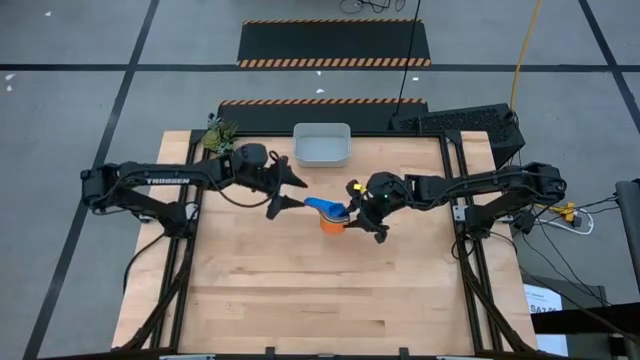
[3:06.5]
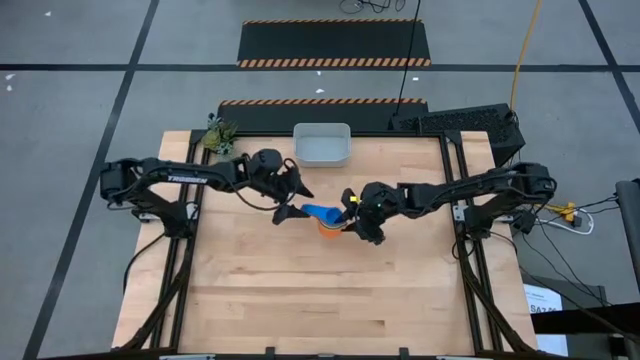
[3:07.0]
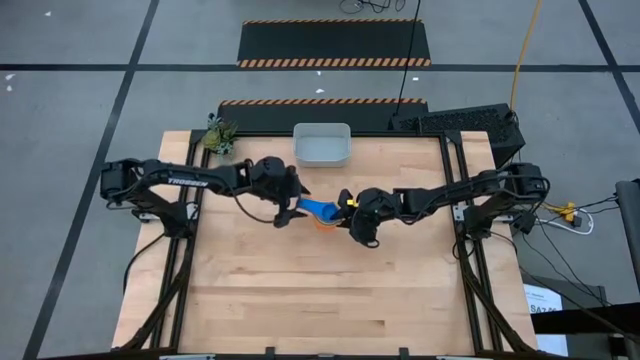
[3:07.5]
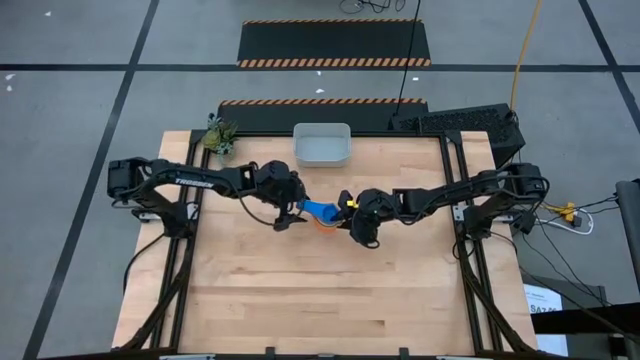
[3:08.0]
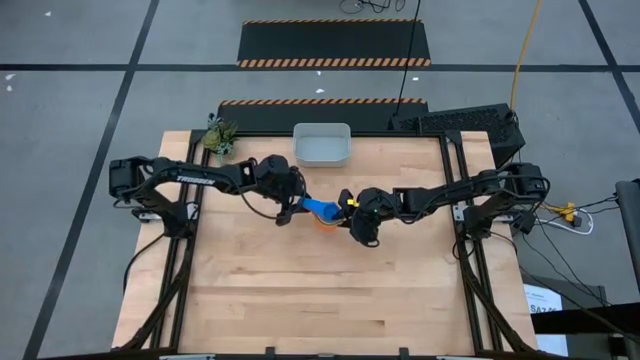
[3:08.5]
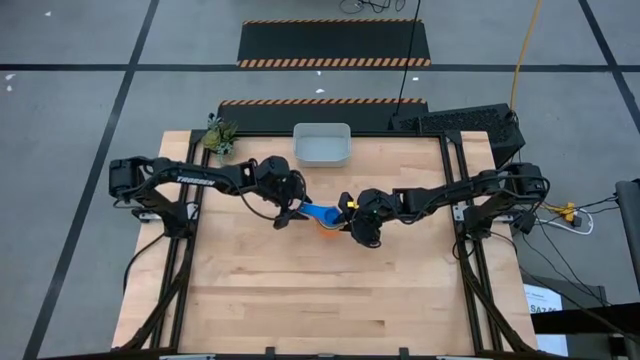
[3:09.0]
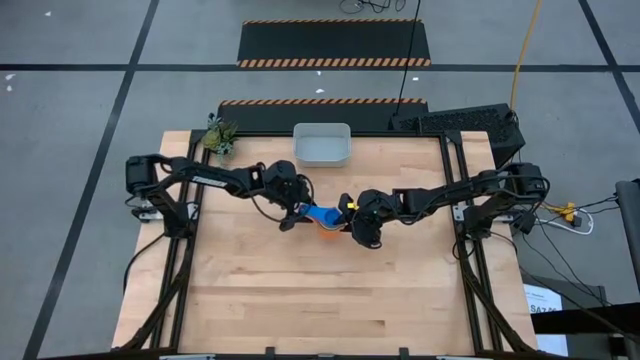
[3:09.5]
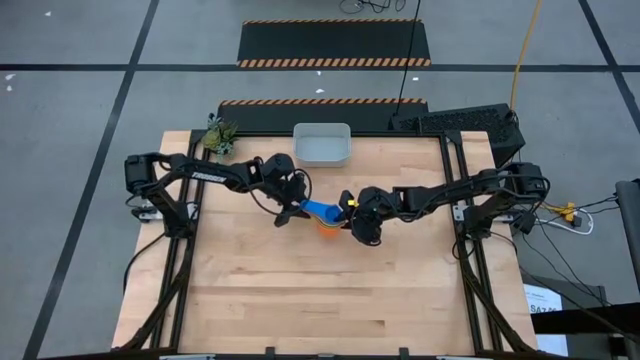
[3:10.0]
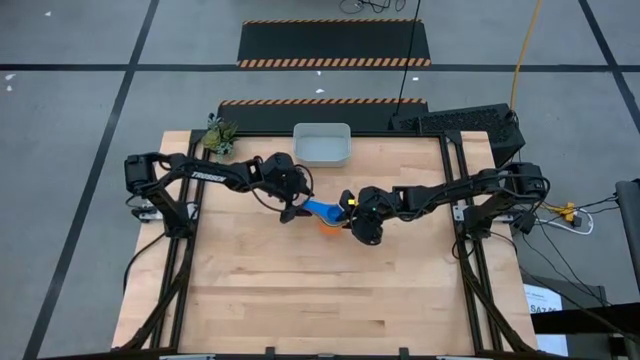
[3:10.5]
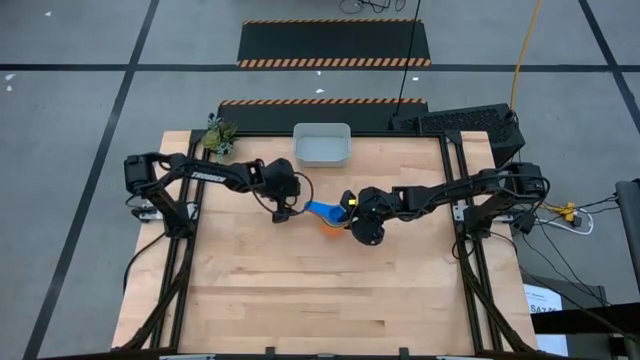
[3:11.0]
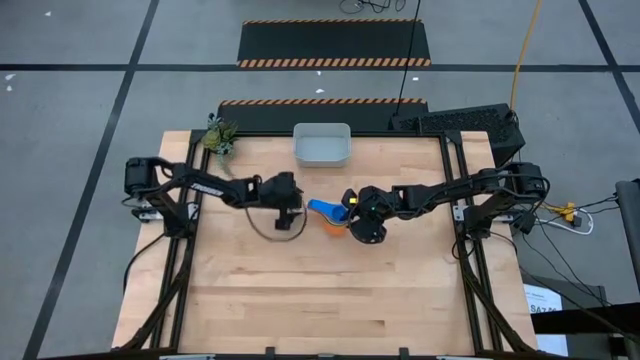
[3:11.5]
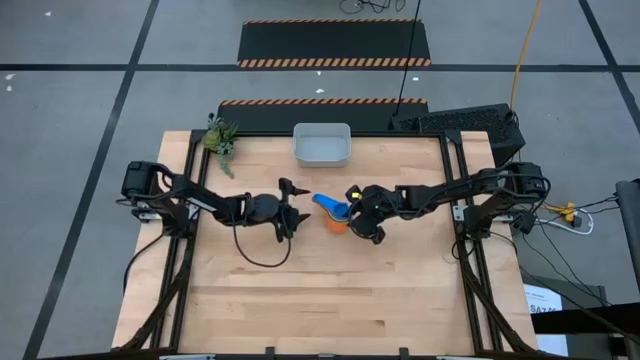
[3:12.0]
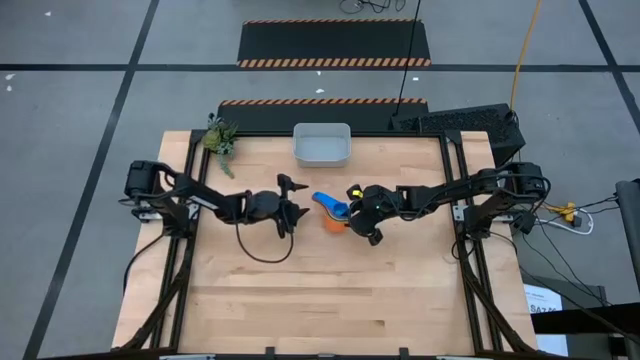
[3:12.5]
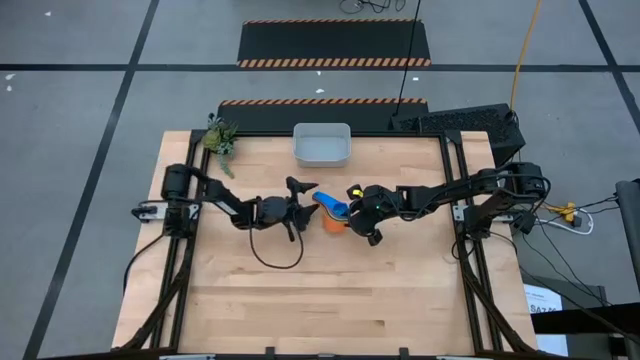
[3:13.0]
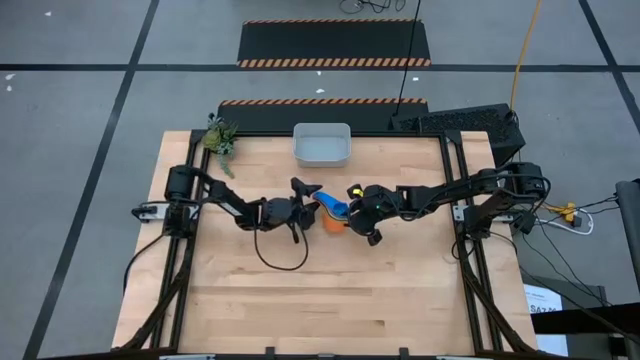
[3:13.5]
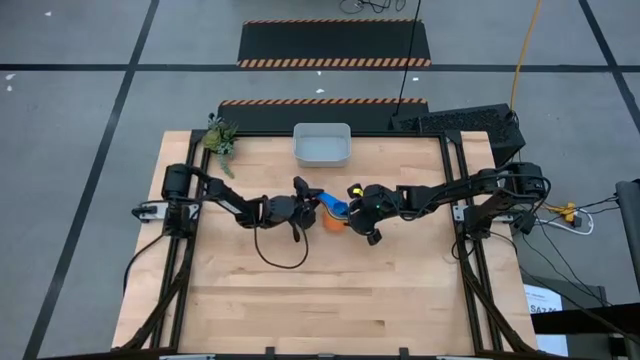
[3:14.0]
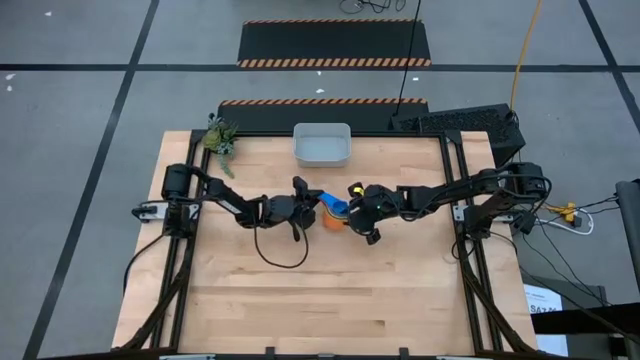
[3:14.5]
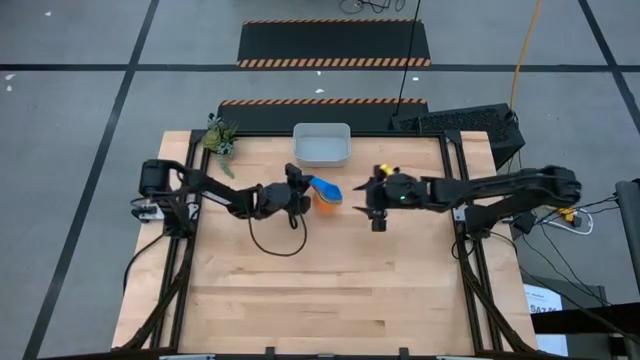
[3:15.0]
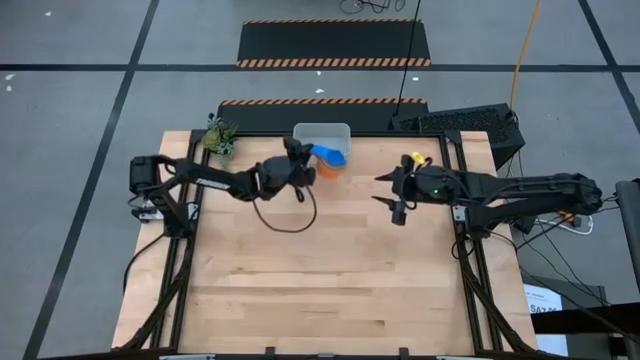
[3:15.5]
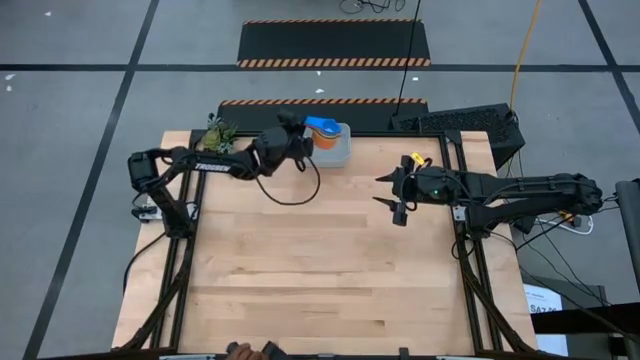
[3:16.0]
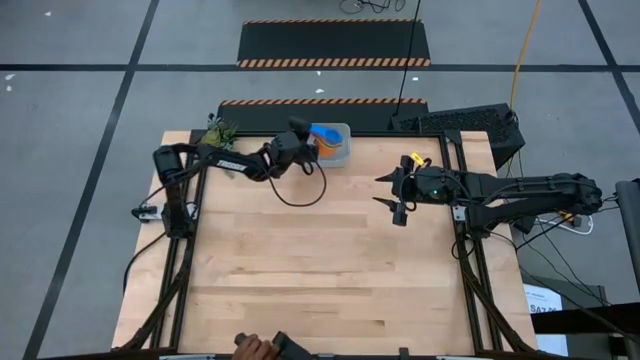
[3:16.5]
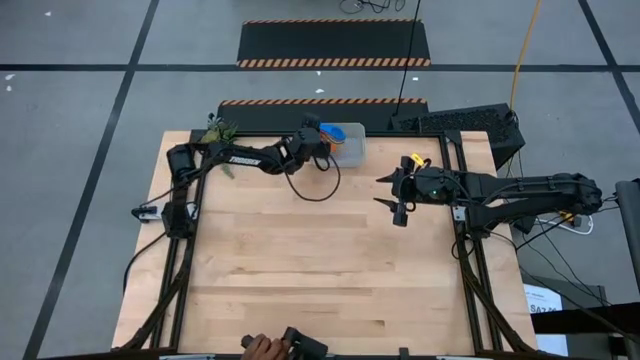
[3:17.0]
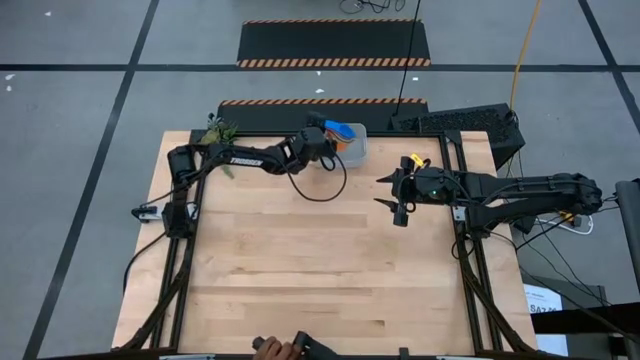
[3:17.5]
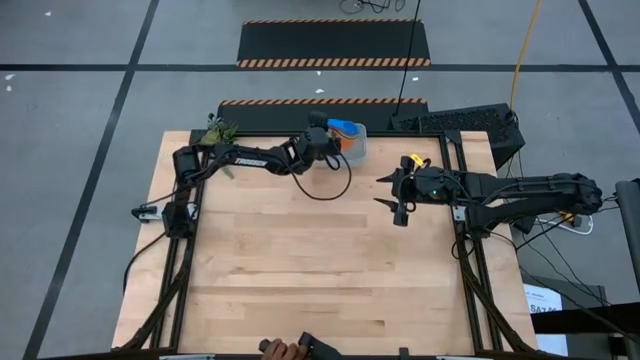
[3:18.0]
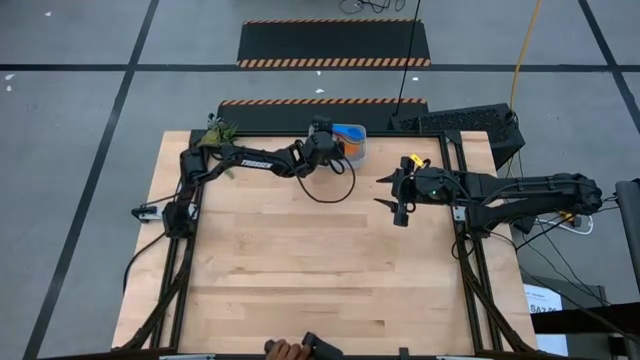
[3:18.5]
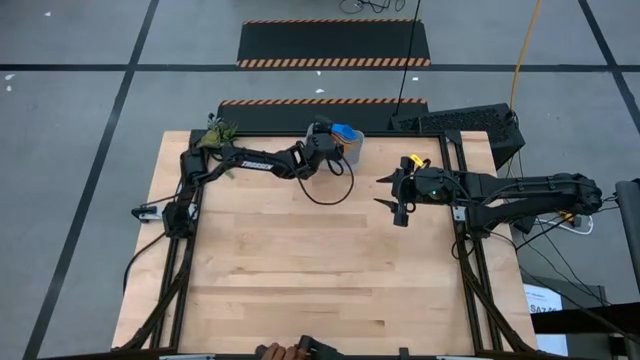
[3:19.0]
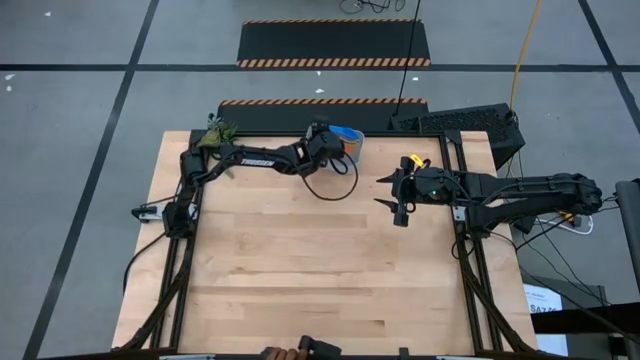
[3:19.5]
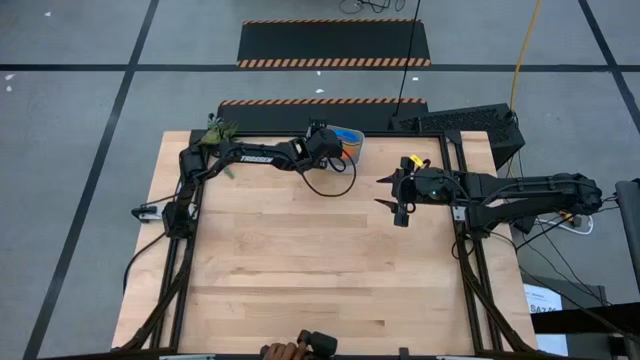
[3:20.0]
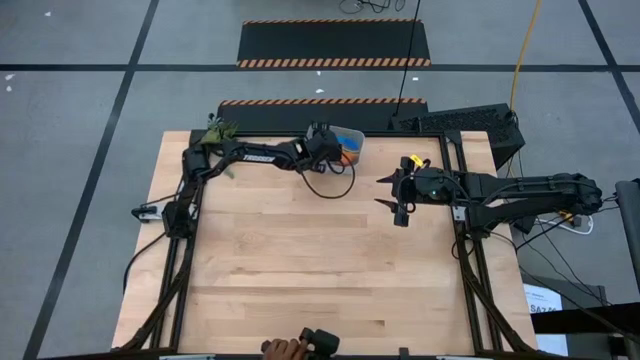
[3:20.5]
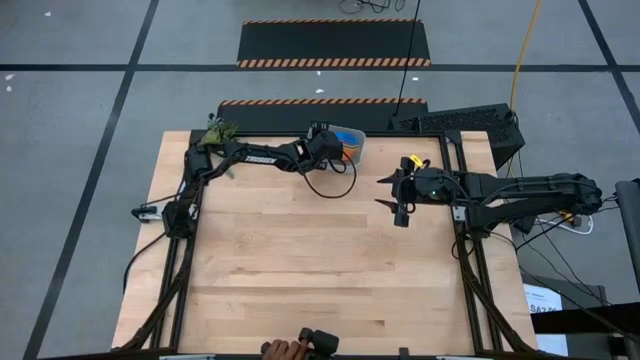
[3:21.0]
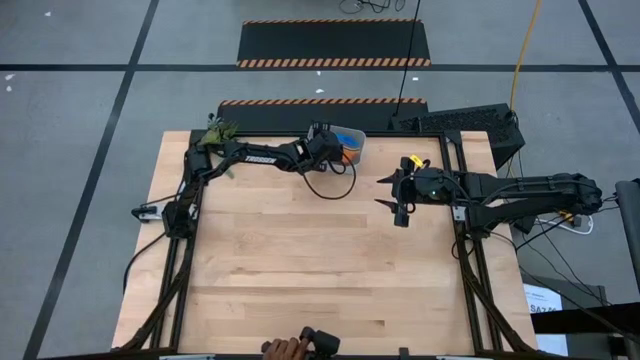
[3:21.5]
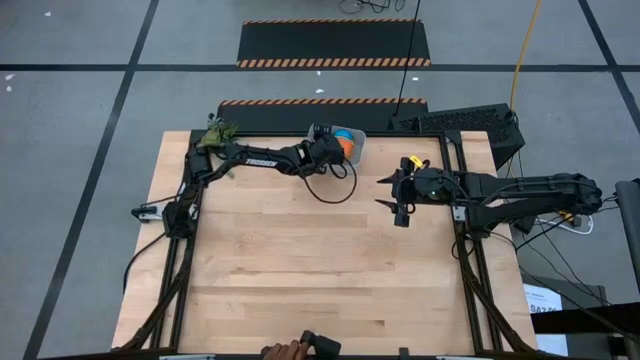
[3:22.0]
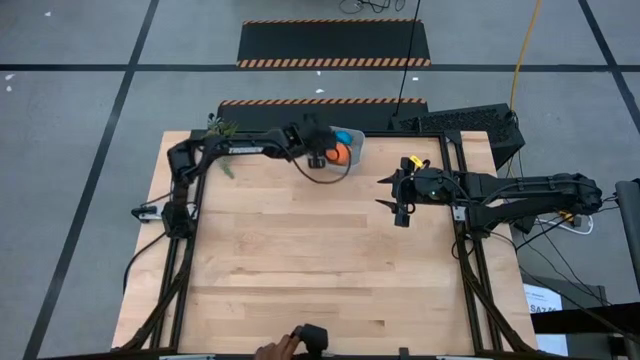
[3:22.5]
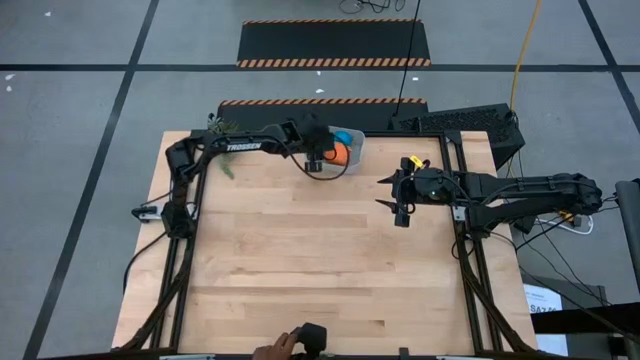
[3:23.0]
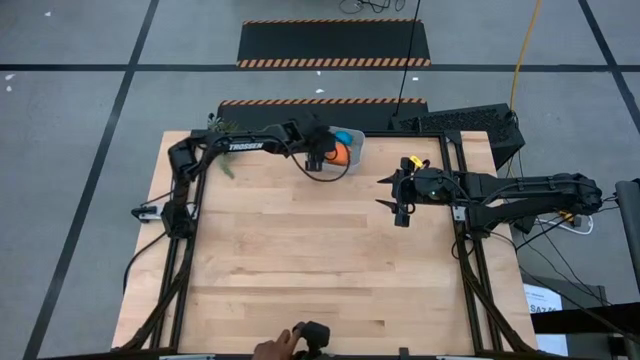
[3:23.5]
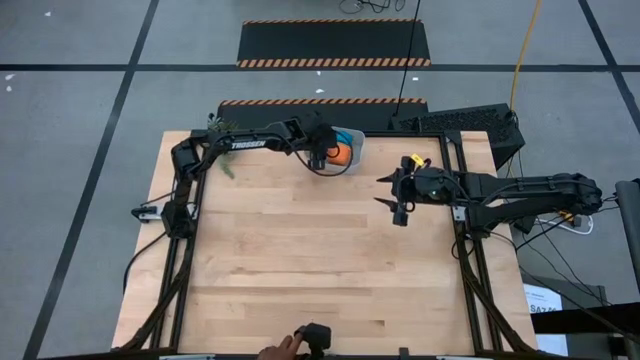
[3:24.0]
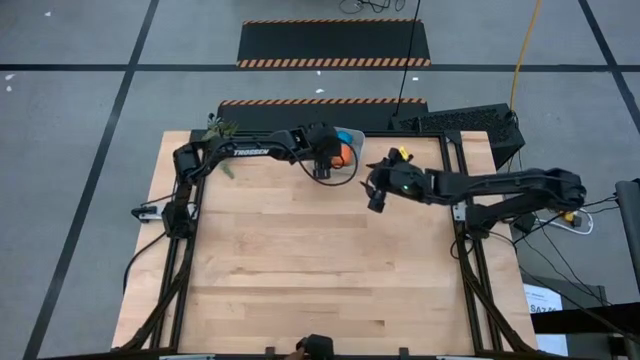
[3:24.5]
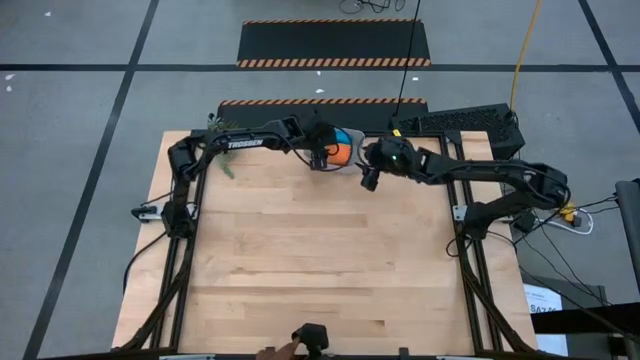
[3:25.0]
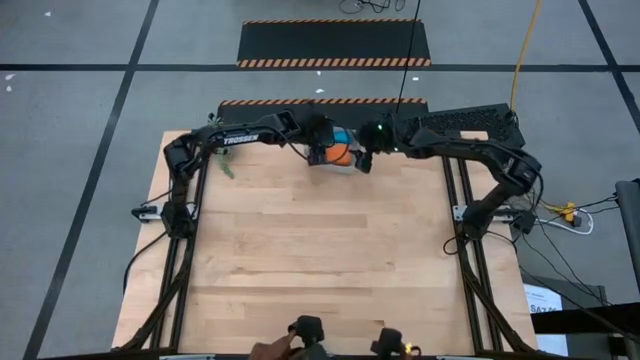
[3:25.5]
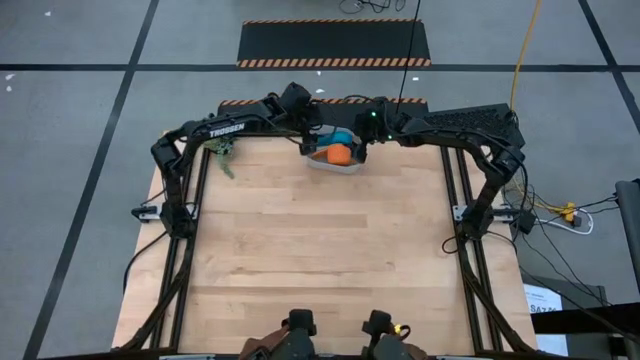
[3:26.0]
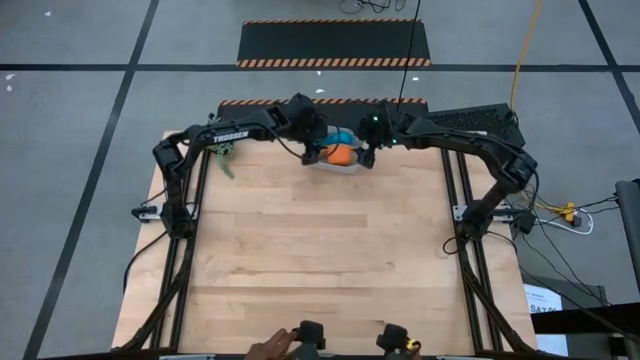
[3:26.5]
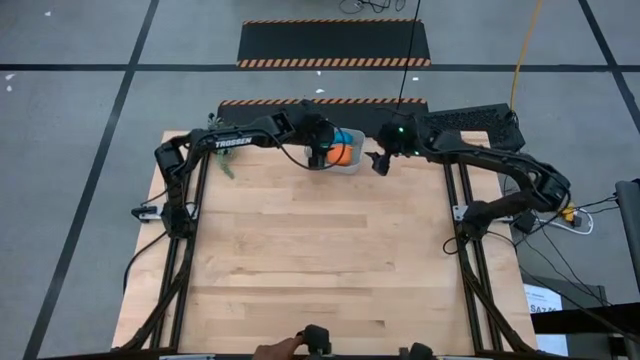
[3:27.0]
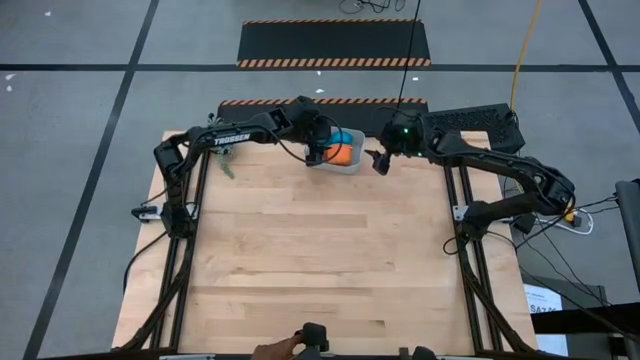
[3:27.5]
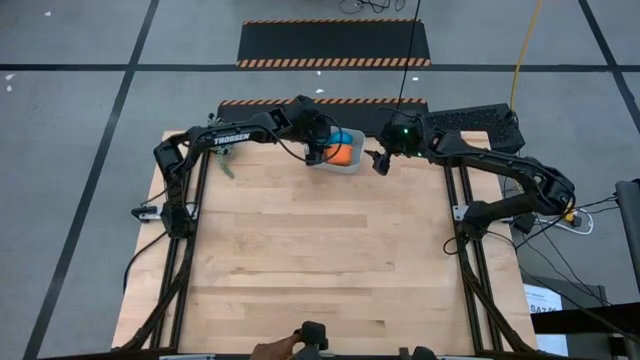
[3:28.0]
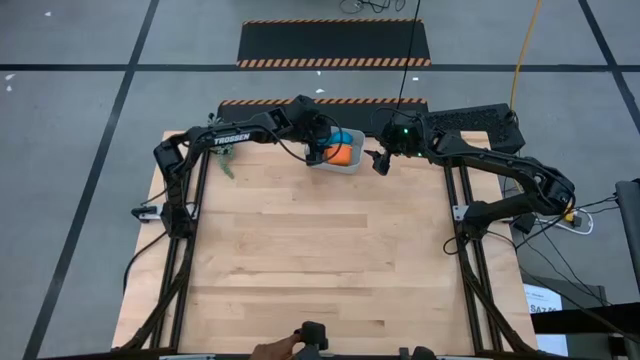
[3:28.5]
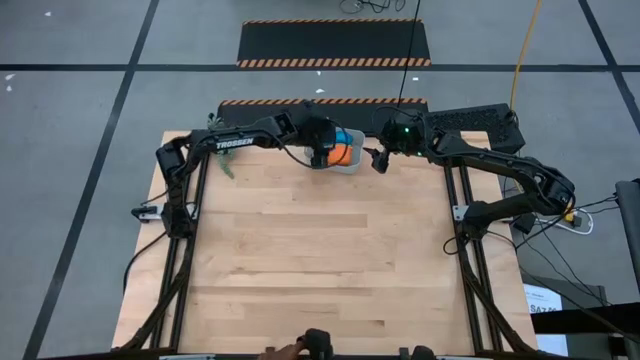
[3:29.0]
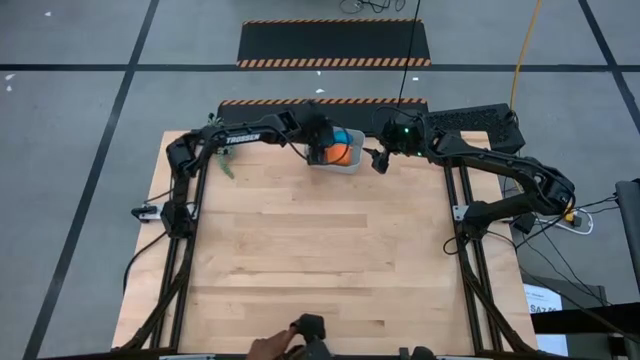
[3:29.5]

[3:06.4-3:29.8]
Task: Nest measuring cups in basket
Put the stack of measuring cups into the gray bin
